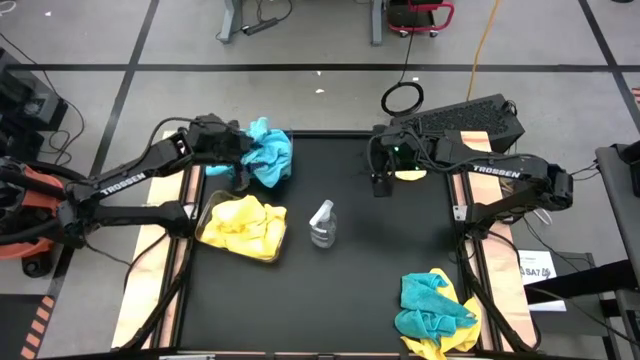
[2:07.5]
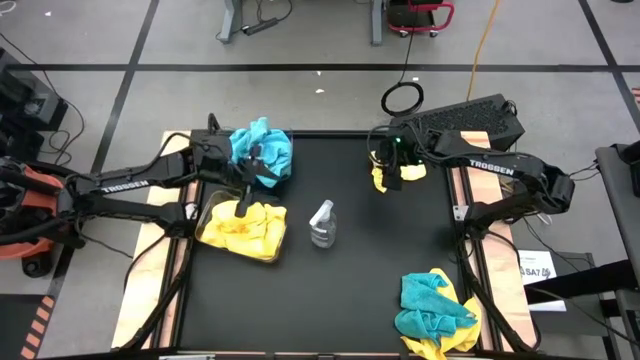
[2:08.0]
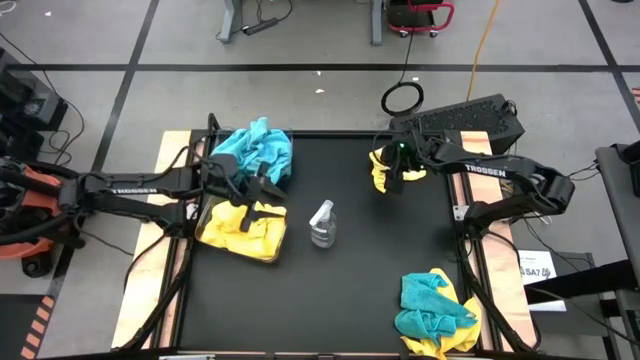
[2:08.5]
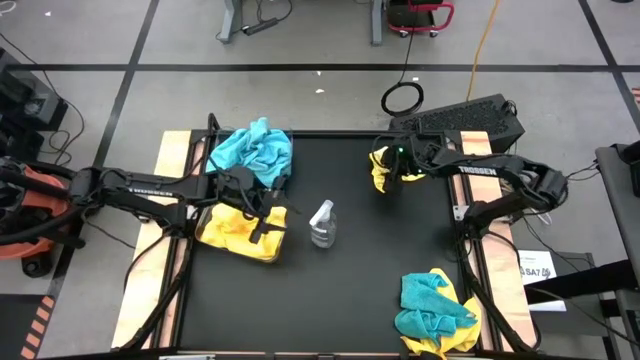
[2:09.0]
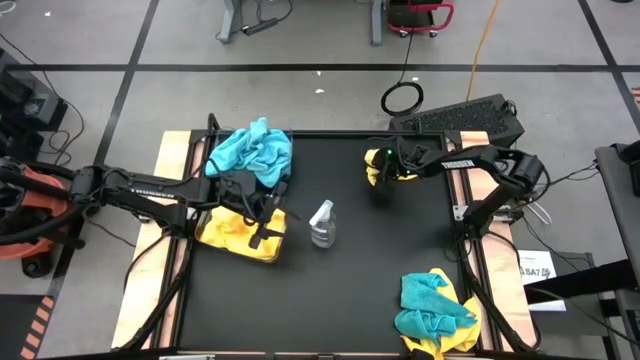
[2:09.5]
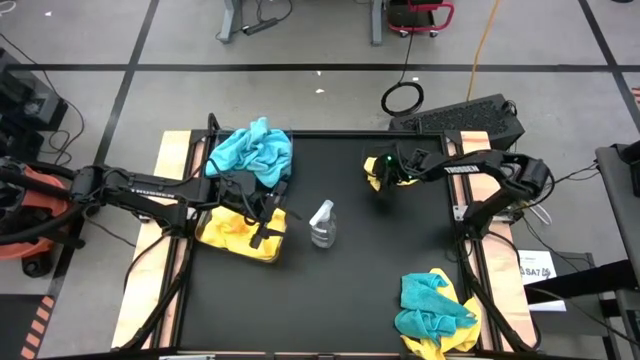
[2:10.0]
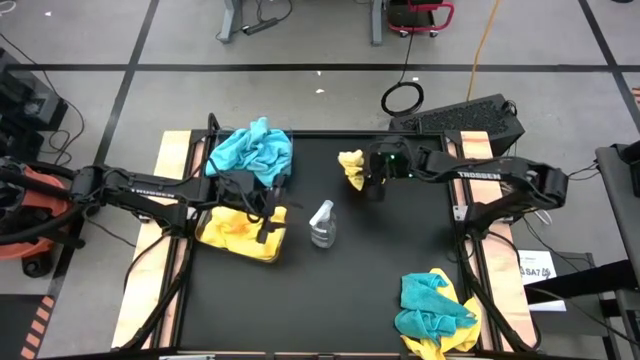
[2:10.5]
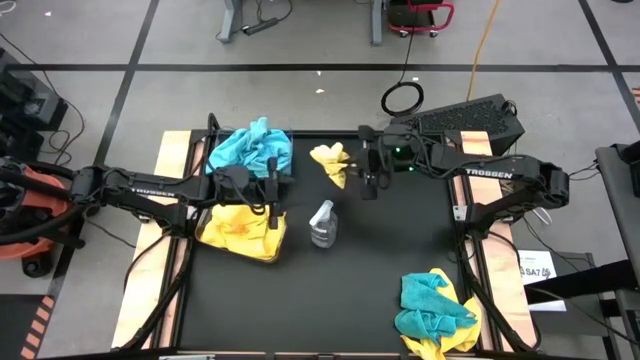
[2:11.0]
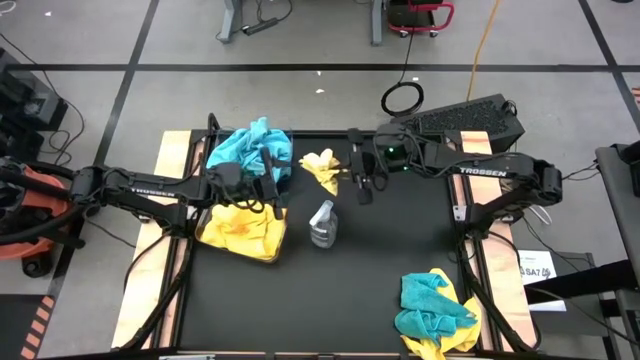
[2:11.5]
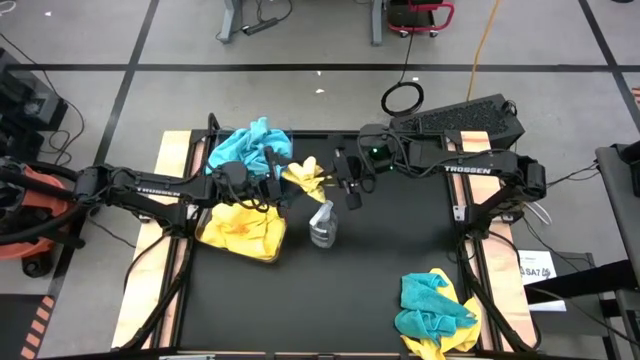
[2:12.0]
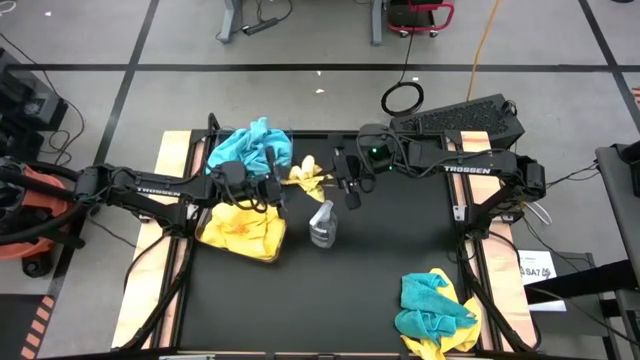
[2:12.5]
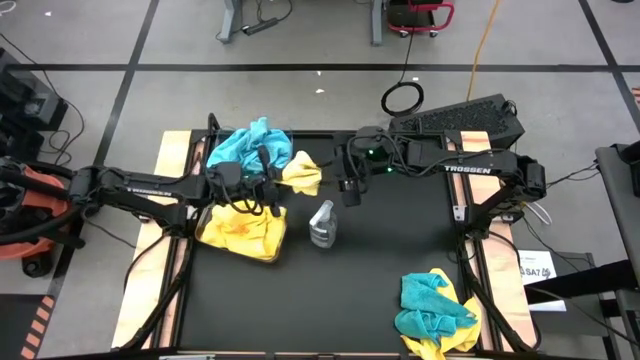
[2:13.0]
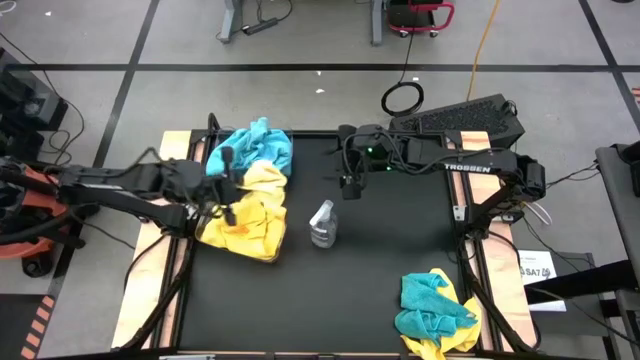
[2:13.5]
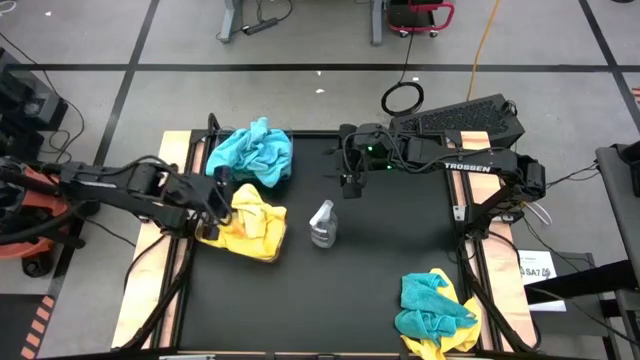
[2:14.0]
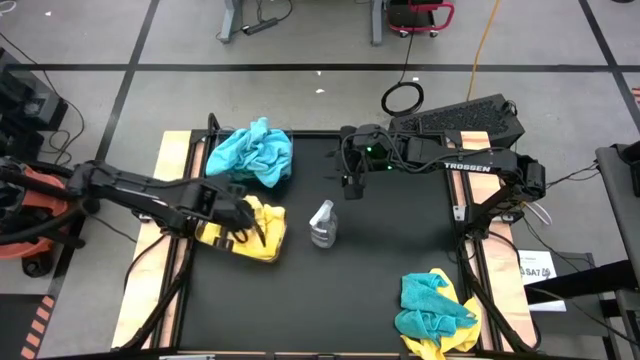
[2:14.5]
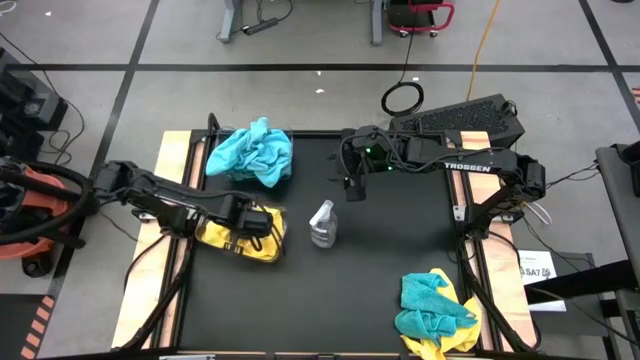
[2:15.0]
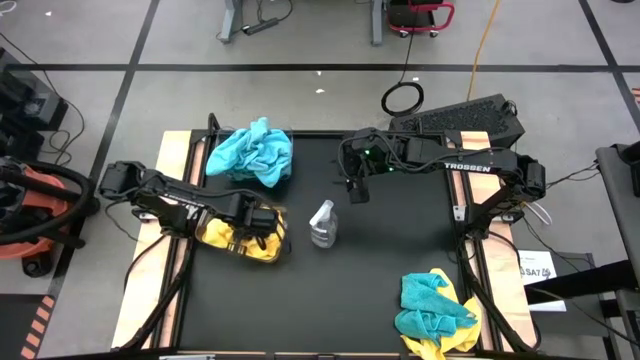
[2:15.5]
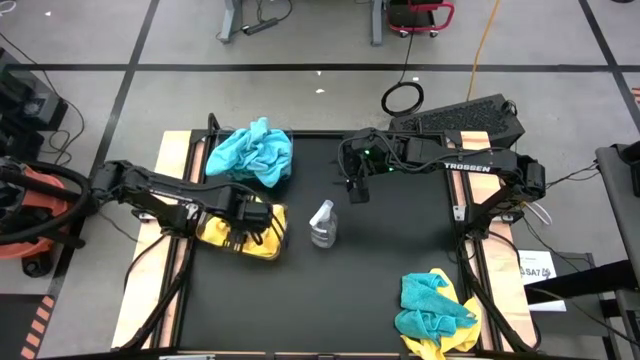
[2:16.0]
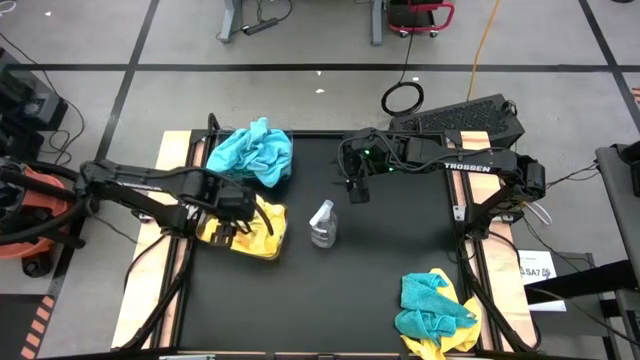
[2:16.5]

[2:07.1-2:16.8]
Task: Sort microfiber towel by color & place in baskets
Put the yellow microfiber cloth into the bottom transparent bin

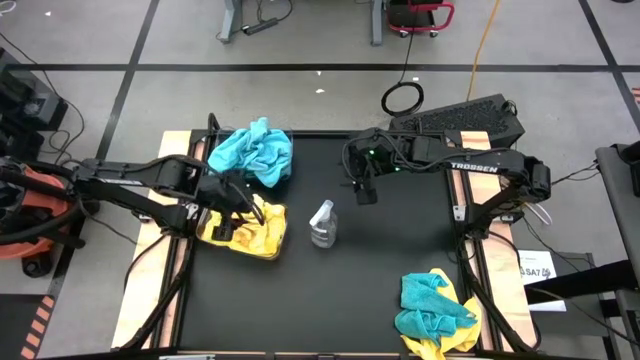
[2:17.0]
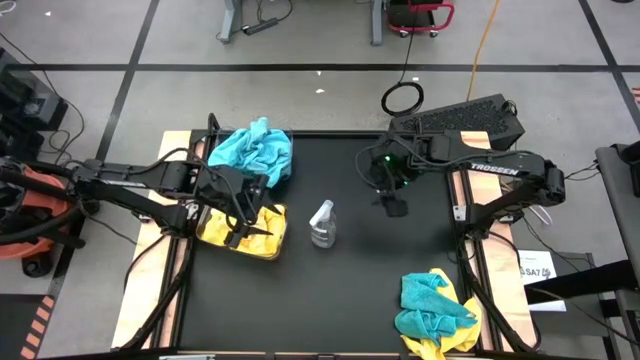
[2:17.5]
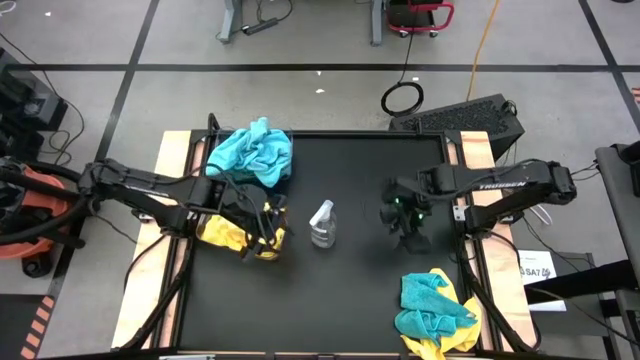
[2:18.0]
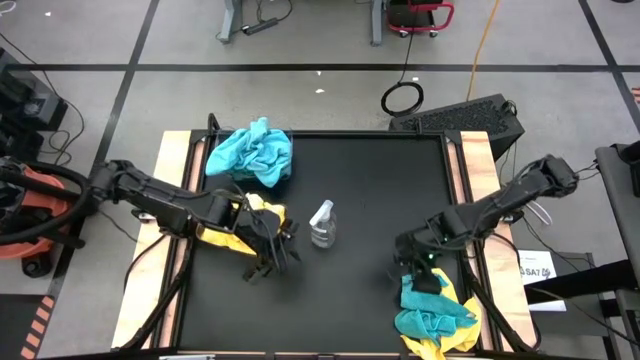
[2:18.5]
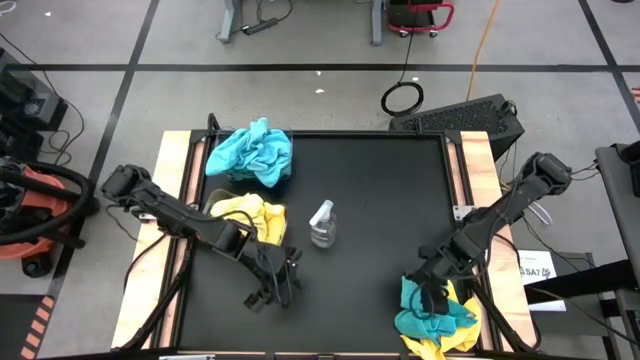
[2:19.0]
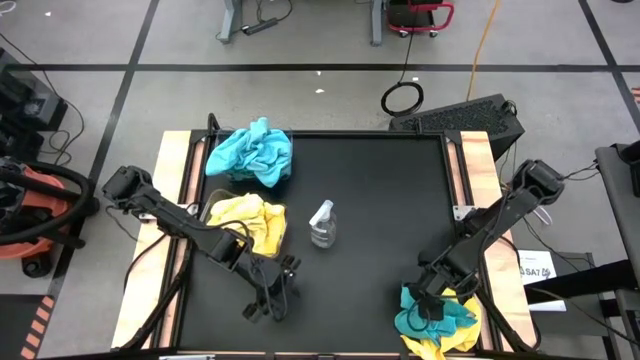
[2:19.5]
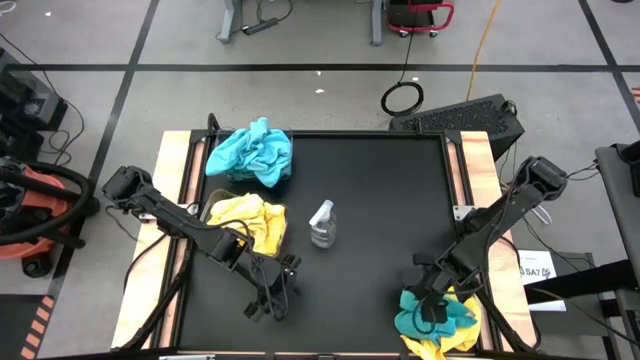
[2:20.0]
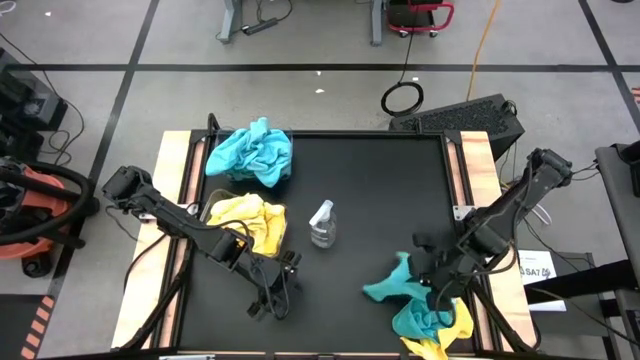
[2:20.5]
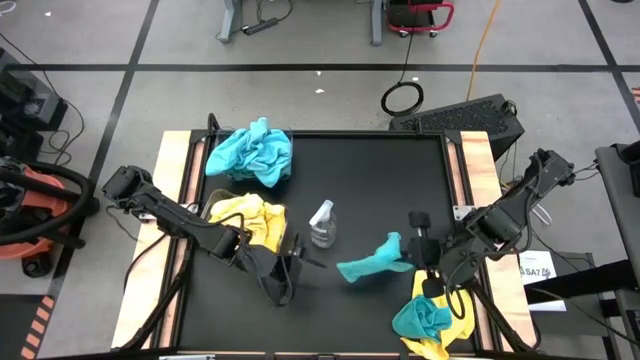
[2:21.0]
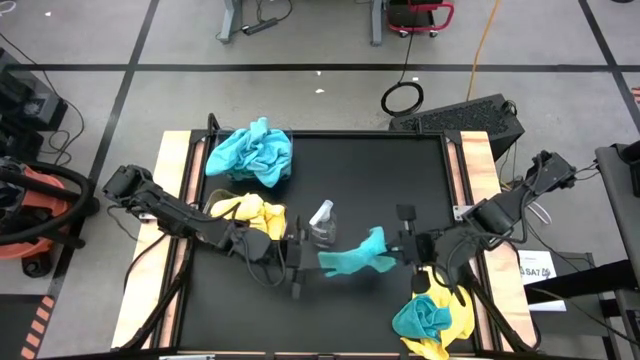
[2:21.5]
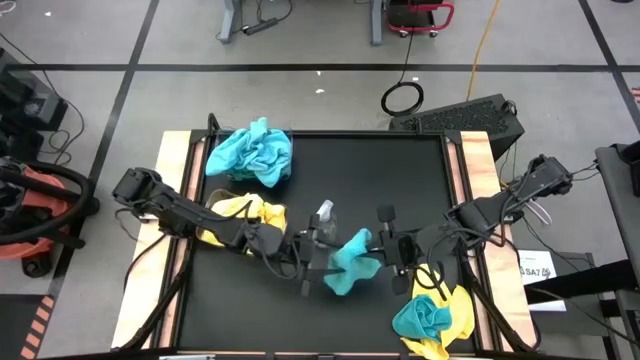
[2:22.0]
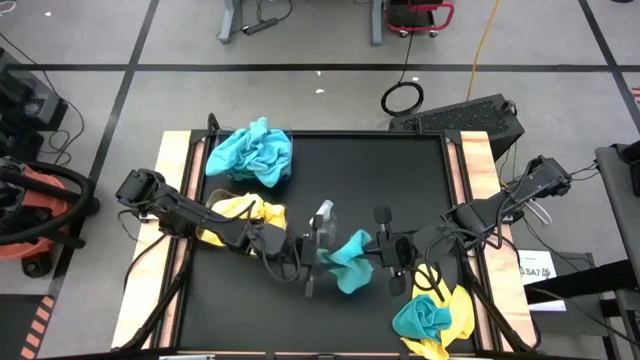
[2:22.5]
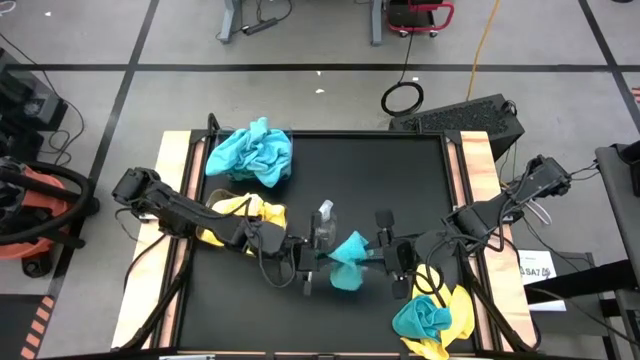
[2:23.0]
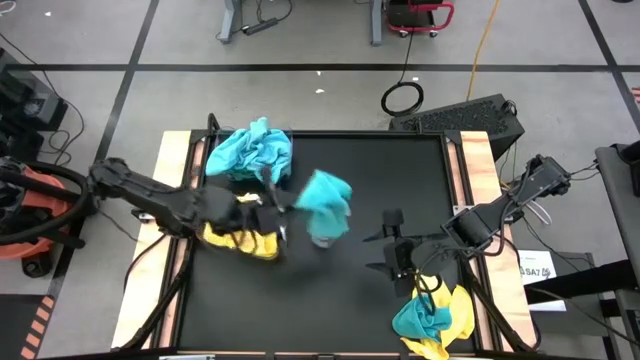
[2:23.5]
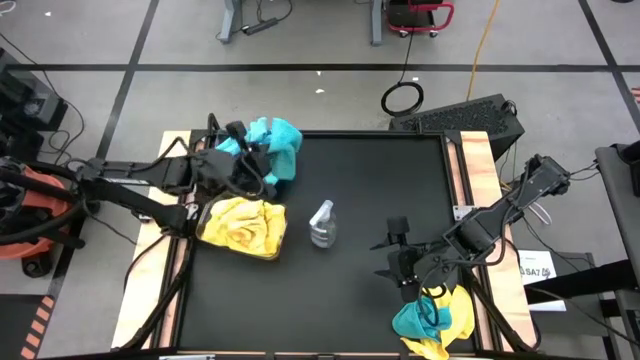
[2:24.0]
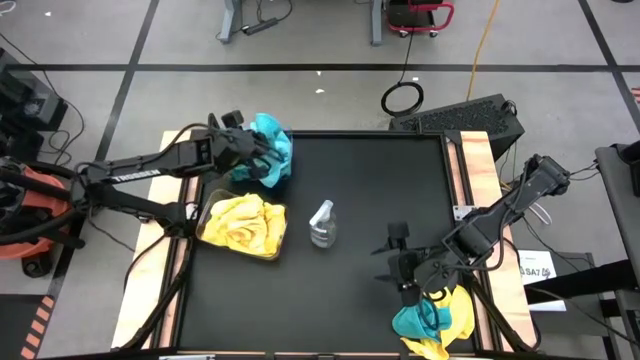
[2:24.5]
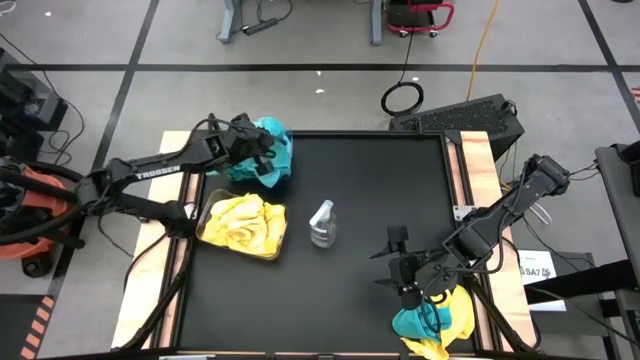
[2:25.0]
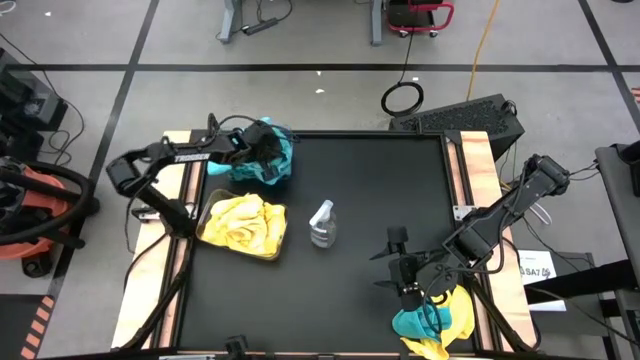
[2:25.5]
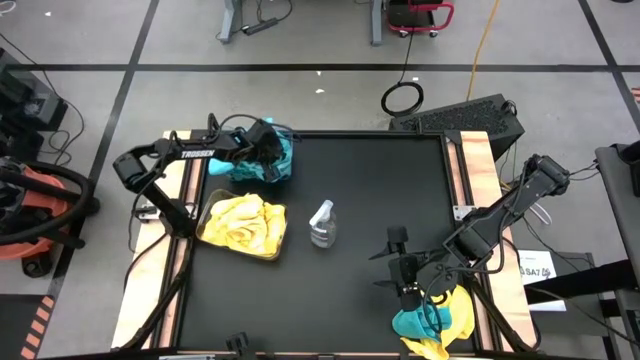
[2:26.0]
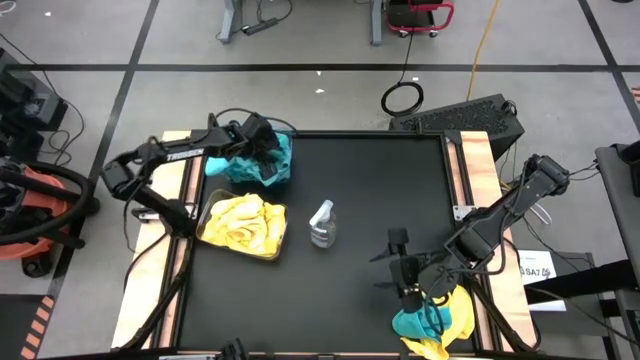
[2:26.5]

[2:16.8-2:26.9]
Put the blue microfiber cloth into the top transparent bin

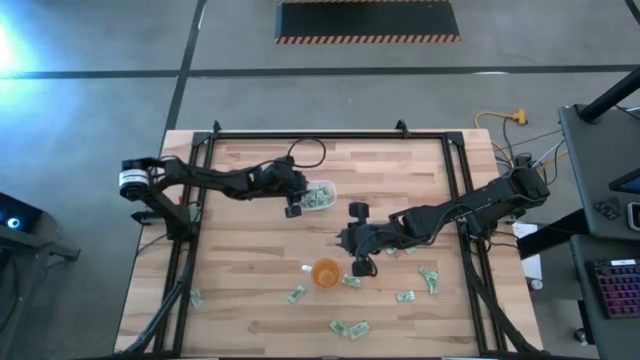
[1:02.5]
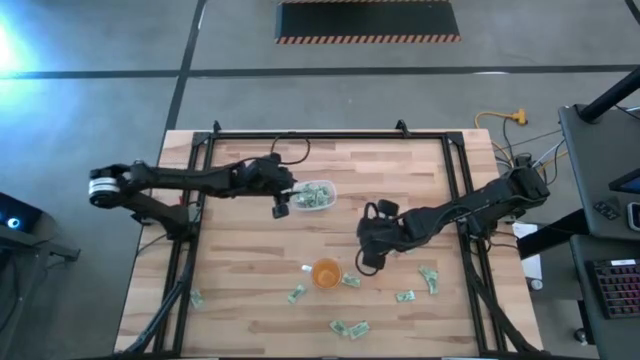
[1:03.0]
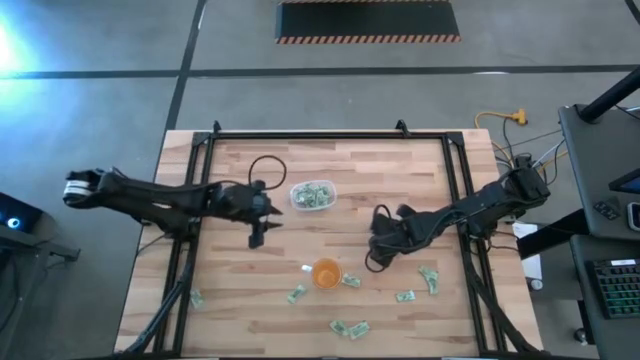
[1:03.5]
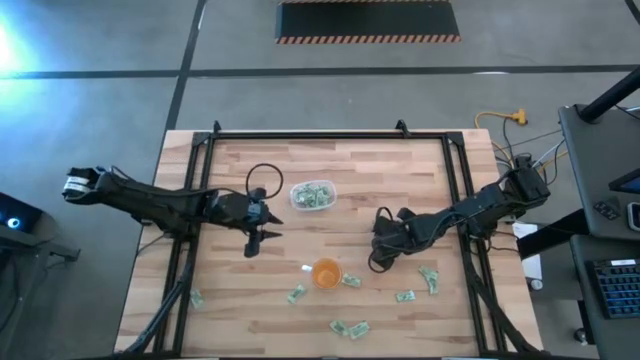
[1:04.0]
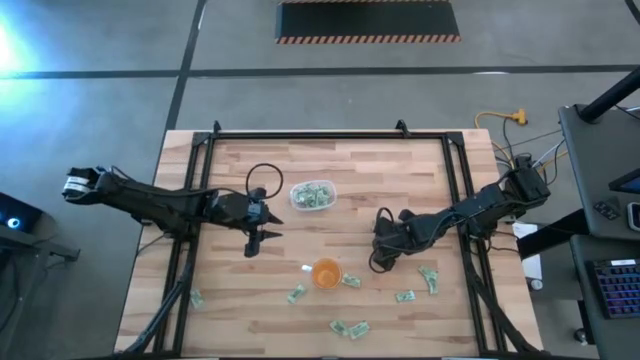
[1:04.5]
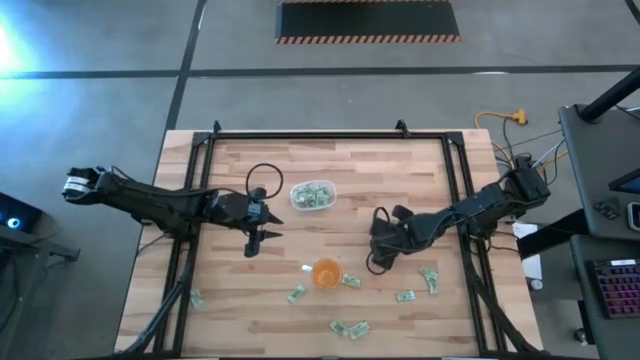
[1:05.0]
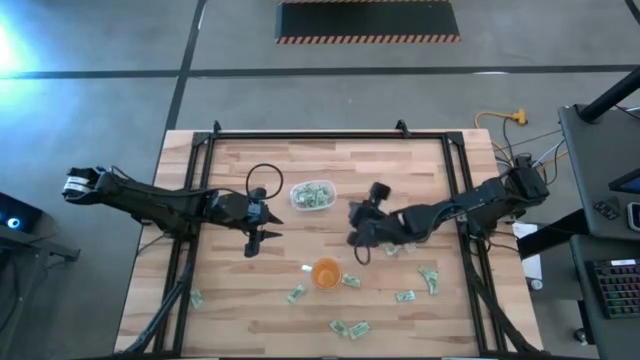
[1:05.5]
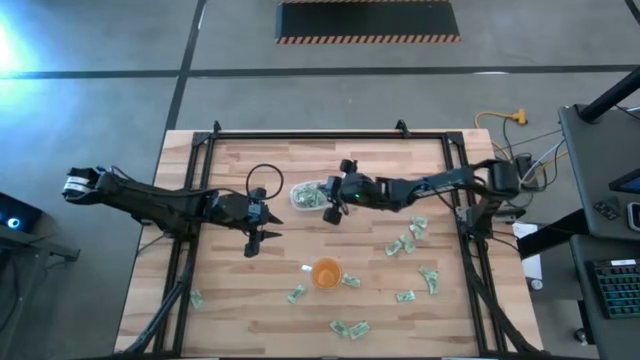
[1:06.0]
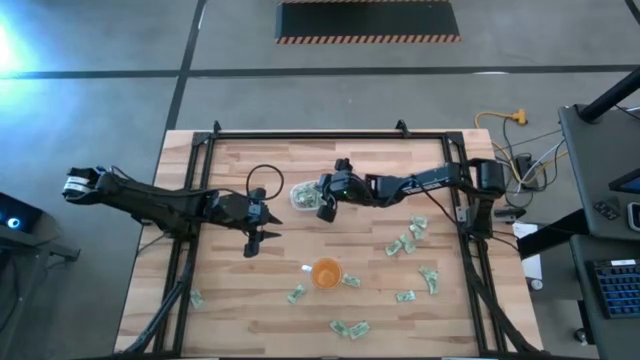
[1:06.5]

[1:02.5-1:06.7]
Task: Pick and place Stevia / Truvia into bins
Put the stevia packet into the transparent bin
